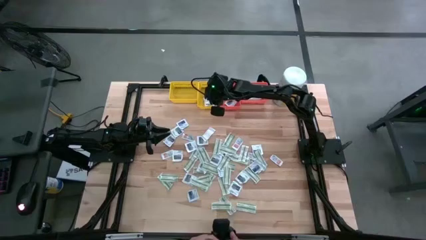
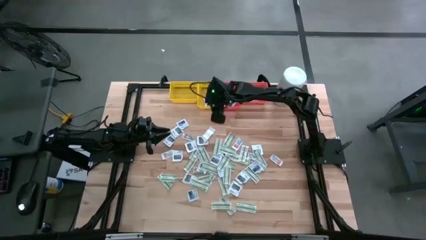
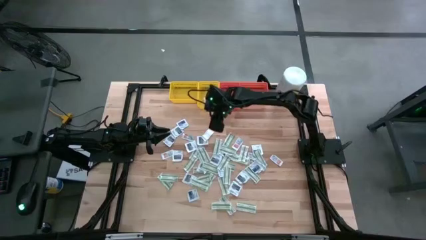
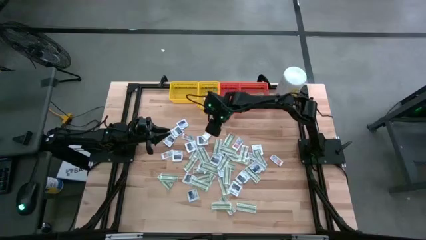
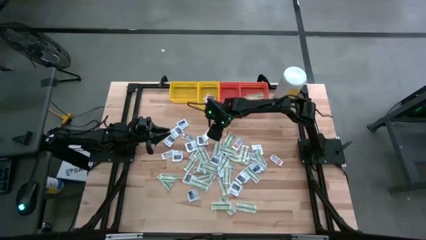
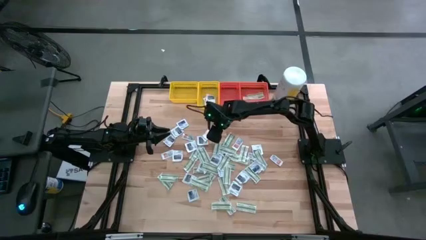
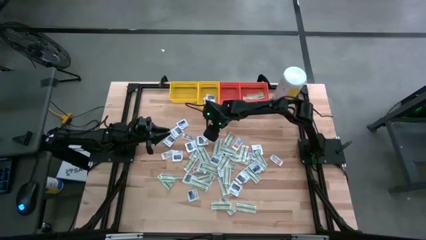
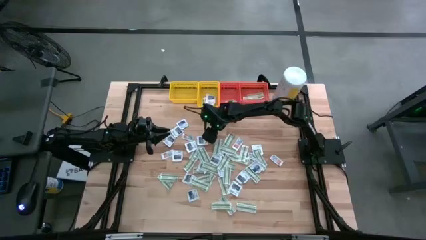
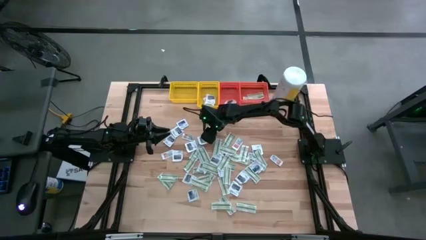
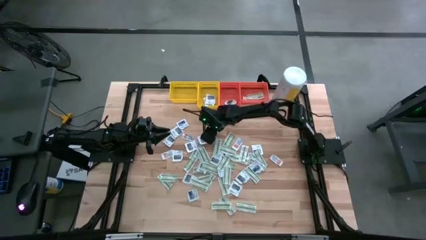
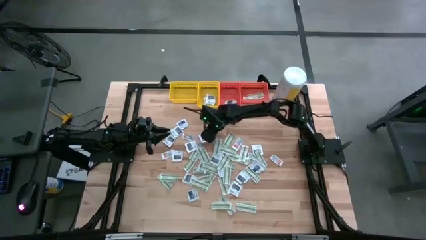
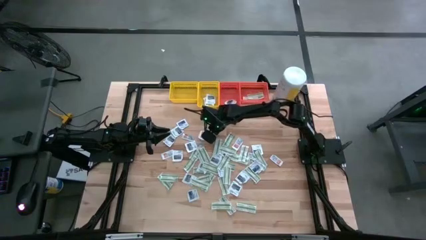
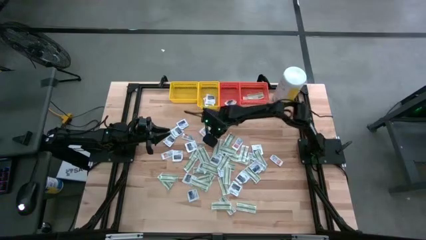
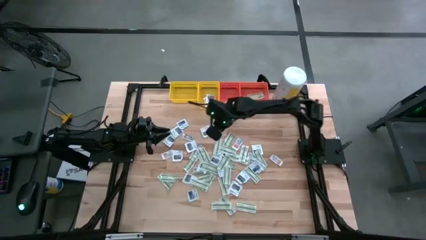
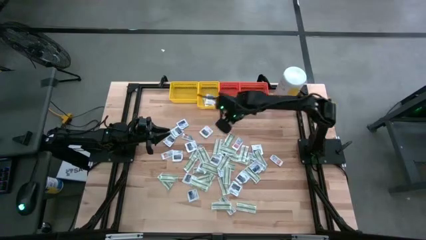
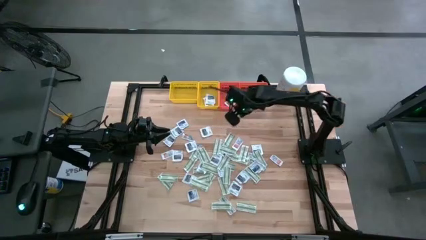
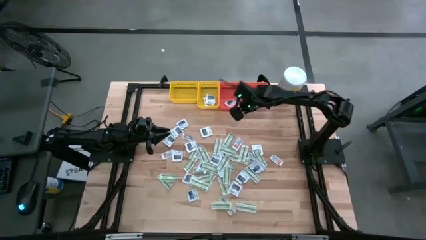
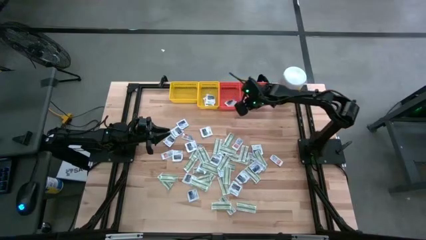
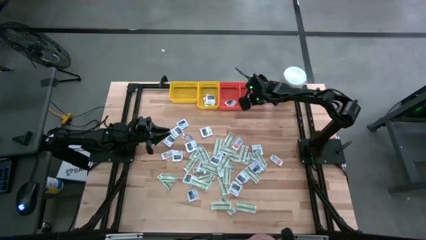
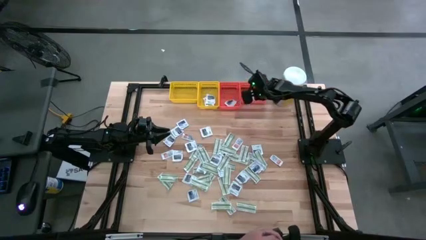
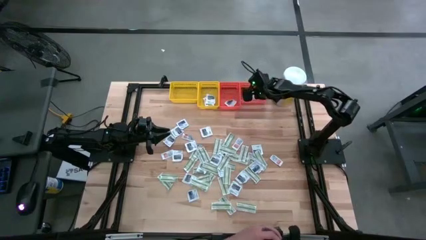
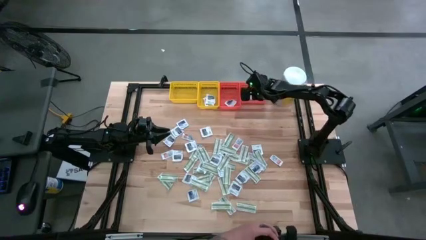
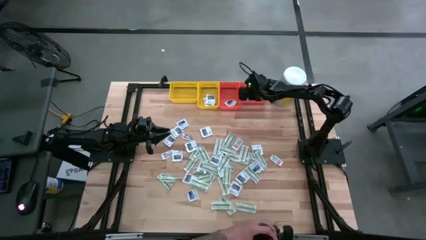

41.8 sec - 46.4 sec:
Task: Pick & Place First Aid Supplies
Put the green pad into the right orange bin

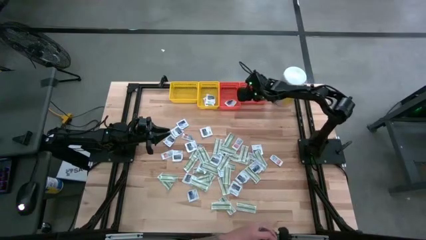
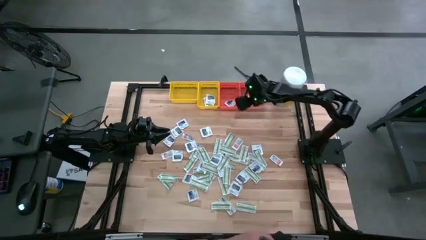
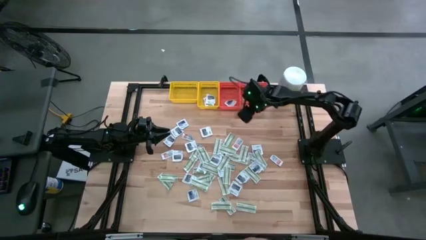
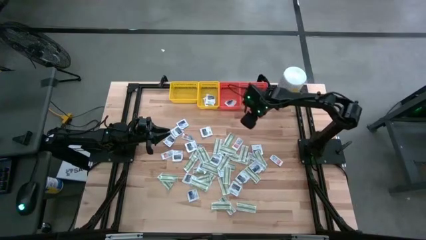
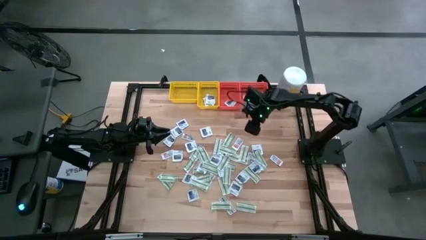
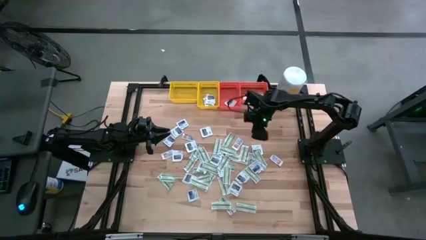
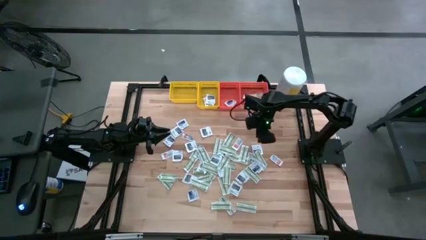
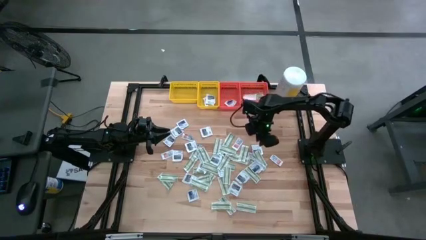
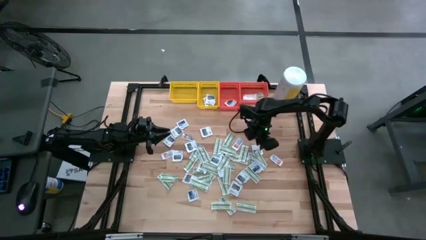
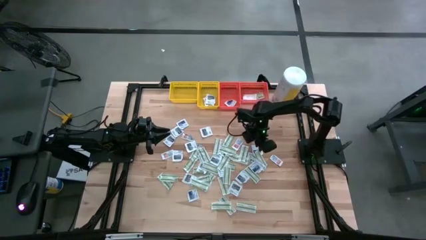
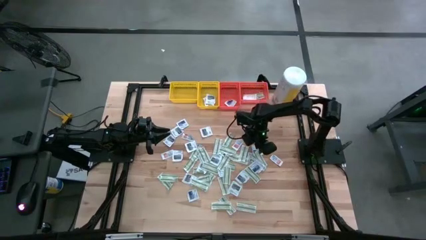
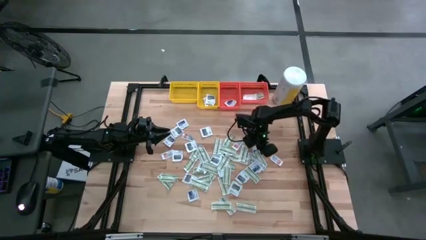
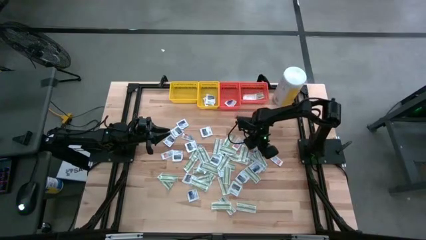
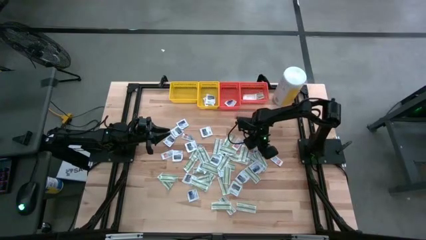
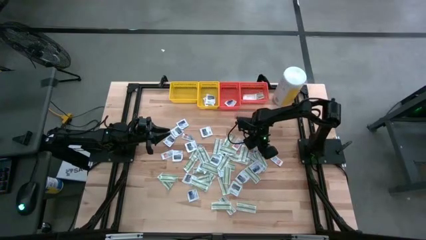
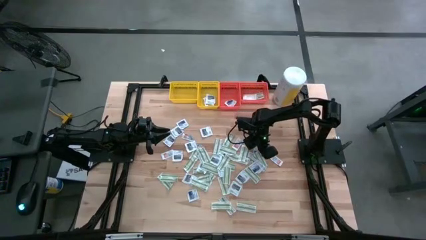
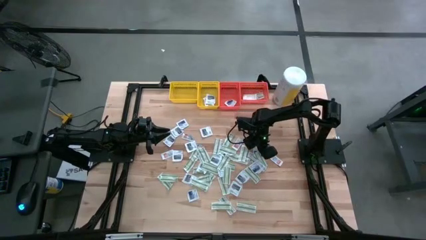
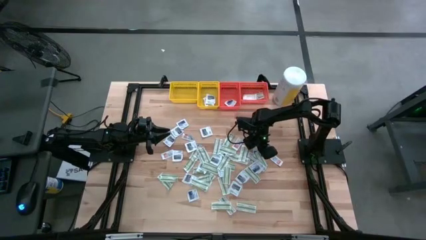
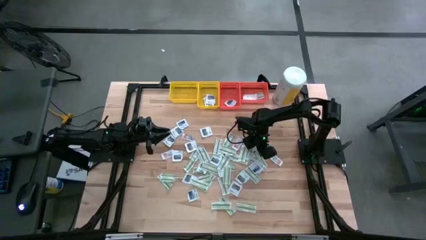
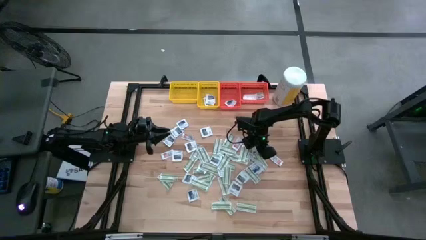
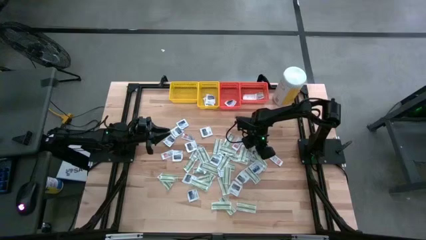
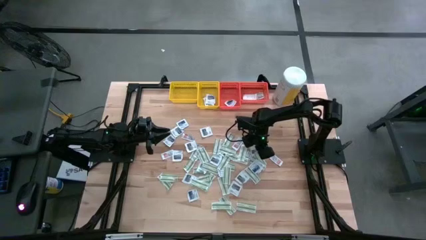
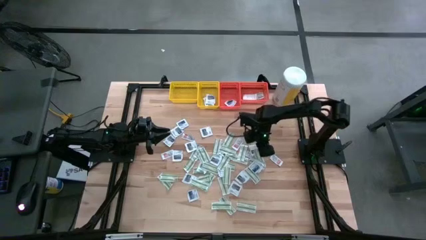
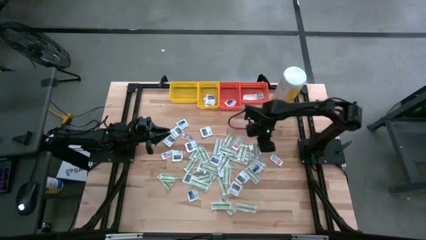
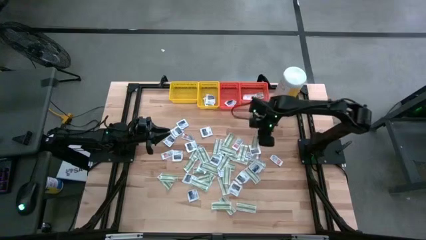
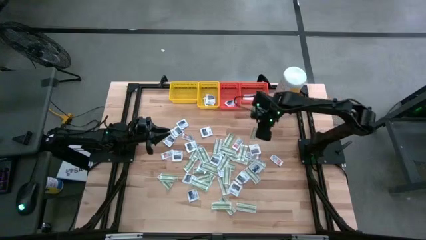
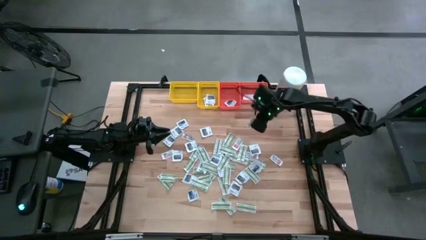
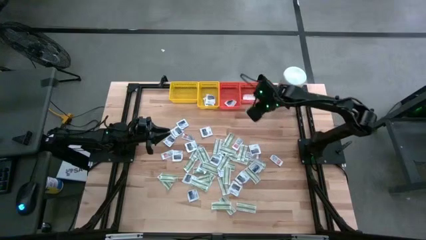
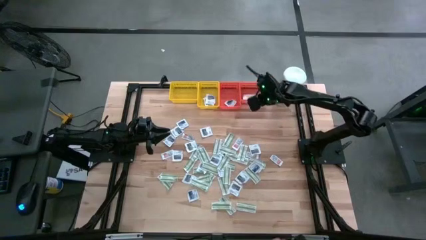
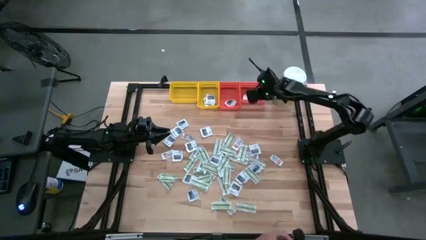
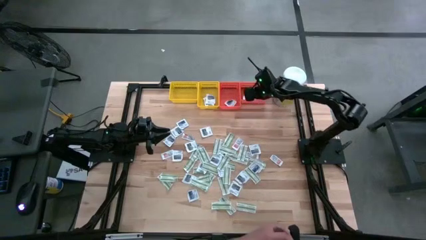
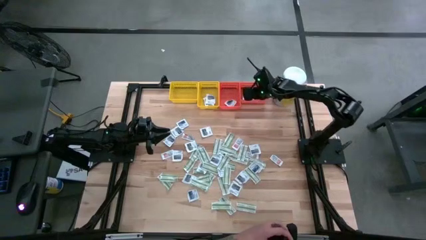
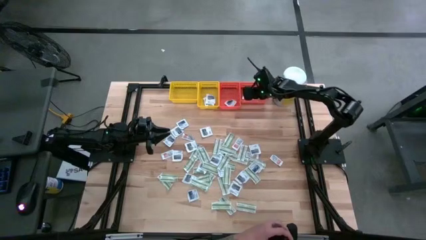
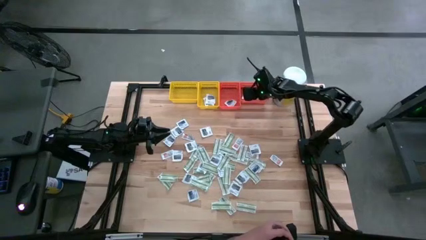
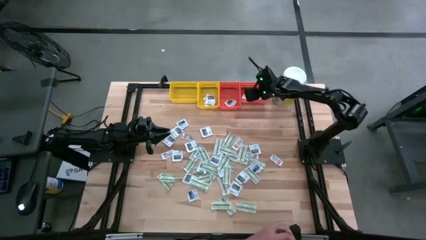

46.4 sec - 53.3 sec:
Put the green pad into the right orange bin

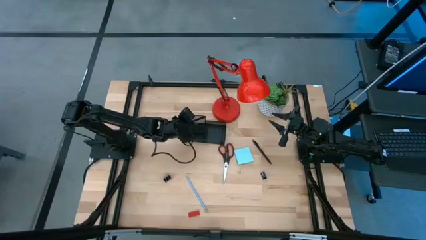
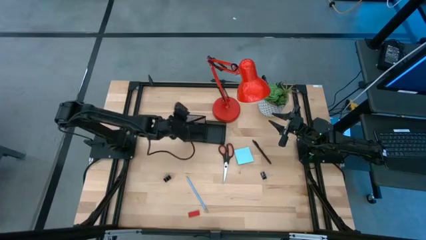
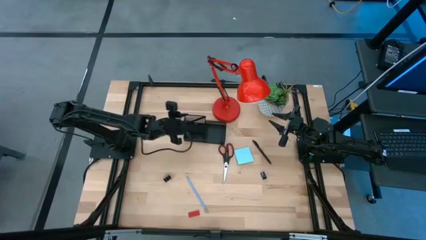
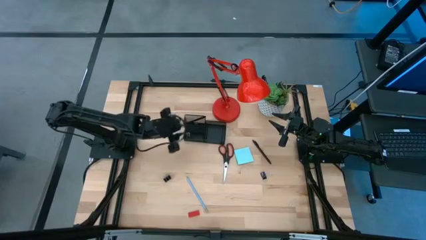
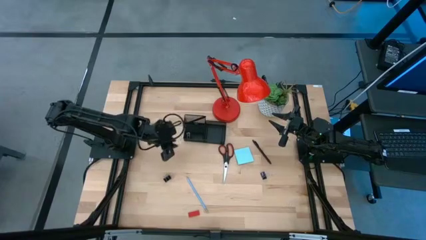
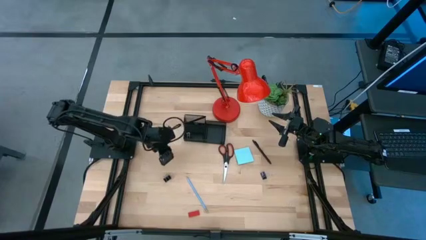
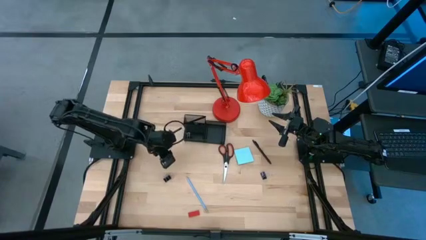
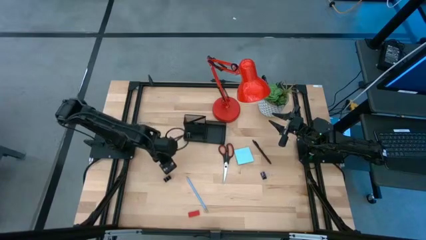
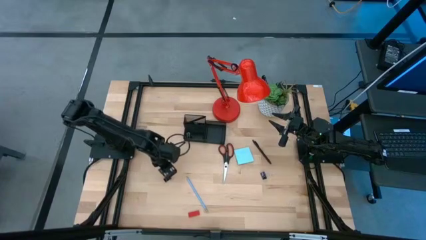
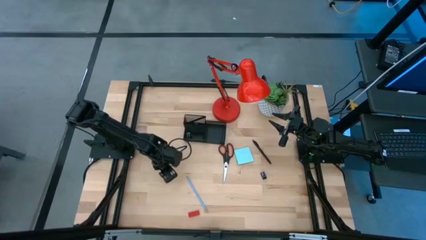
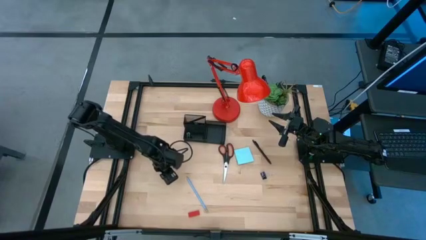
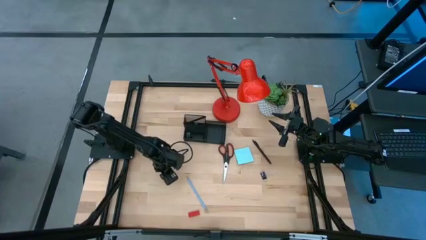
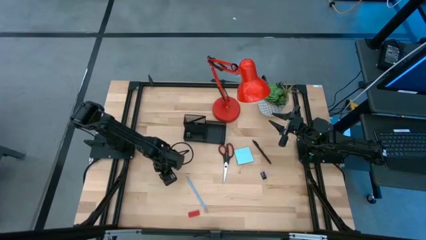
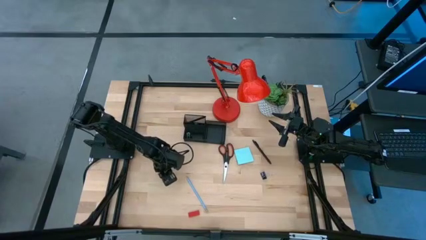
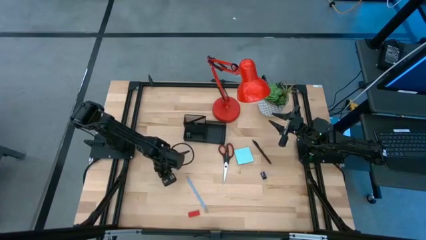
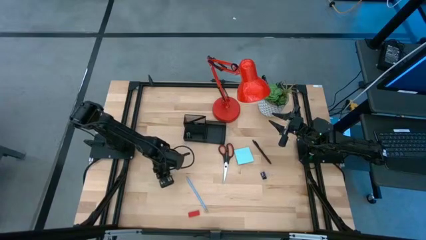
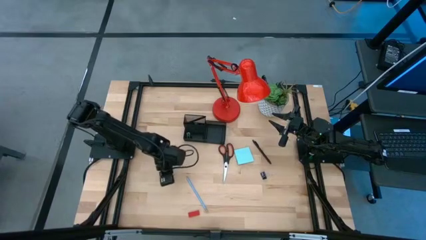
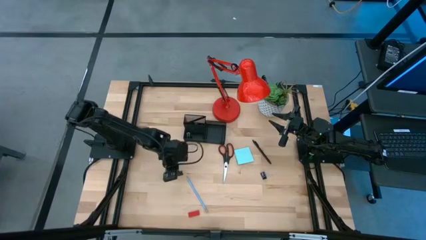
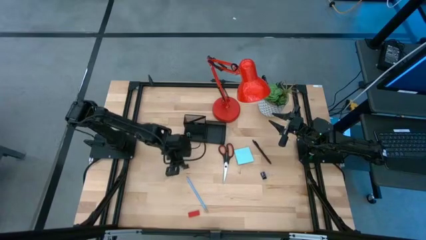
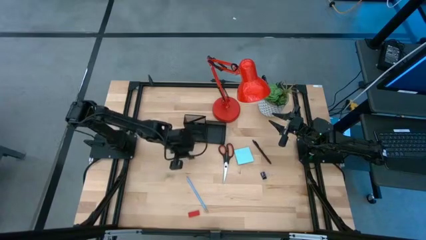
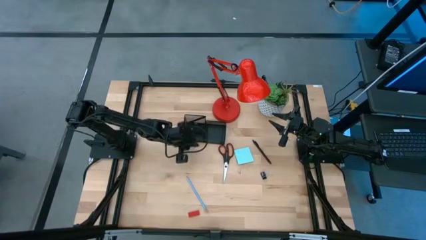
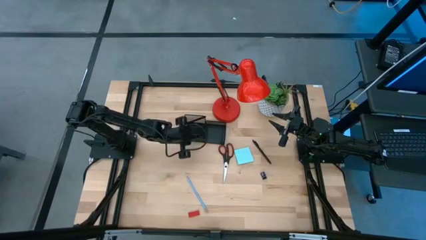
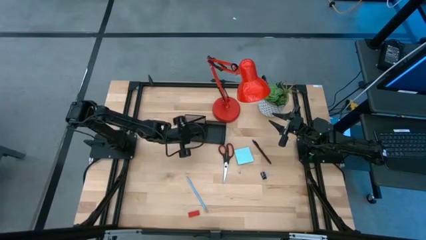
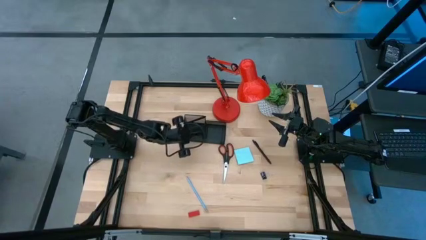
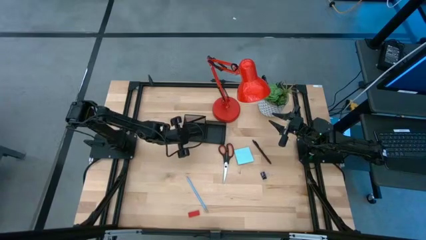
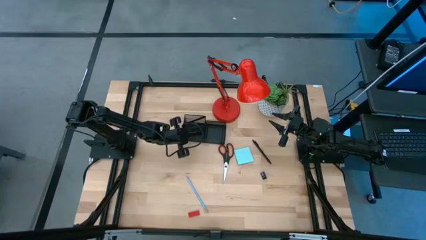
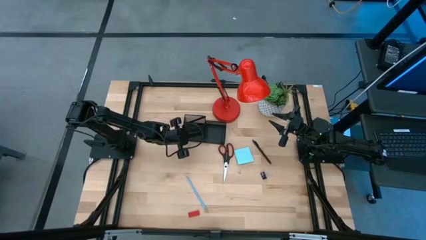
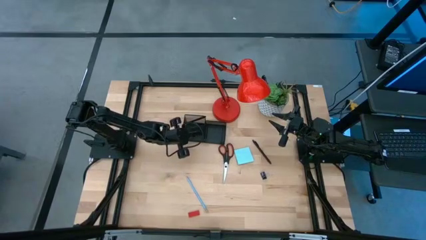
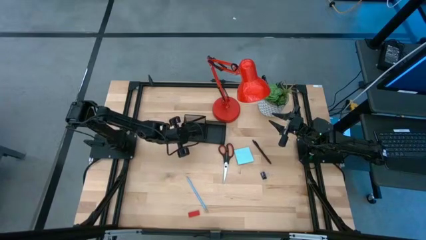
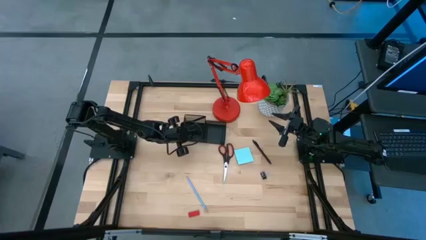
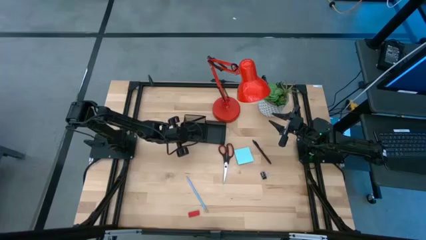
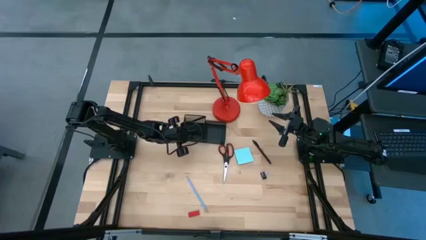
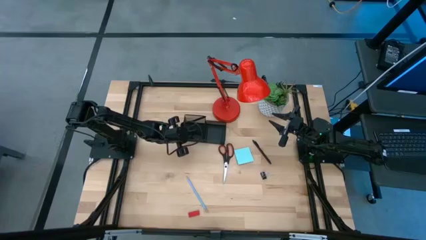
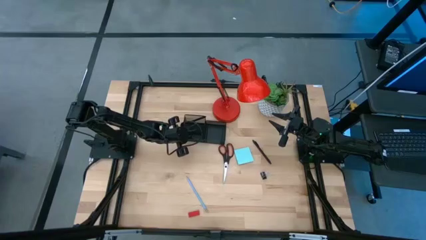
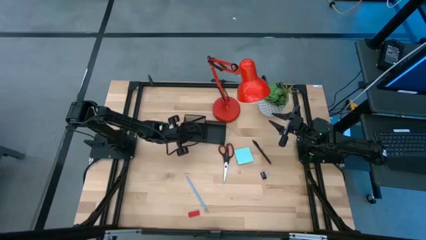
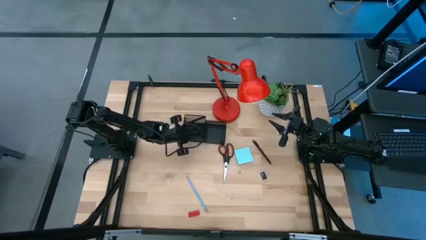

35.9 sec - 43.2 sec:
Task: Pick and place office supplies into organizer
Put the left black binder clip into the black desk organizer
